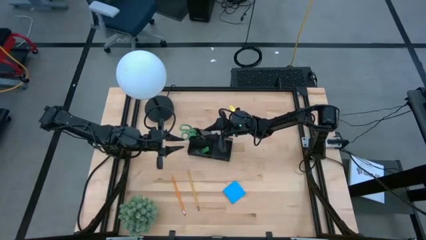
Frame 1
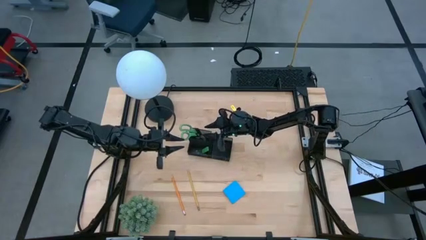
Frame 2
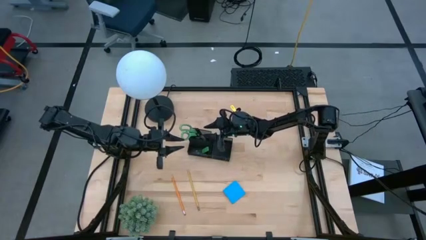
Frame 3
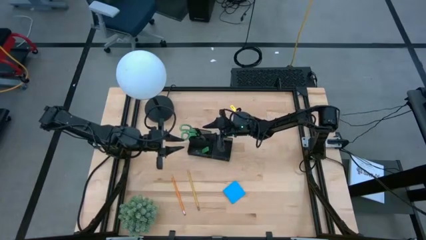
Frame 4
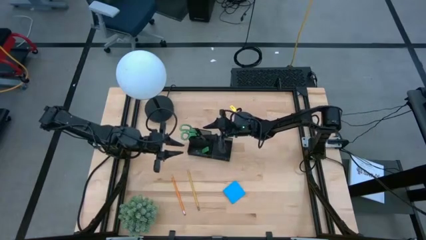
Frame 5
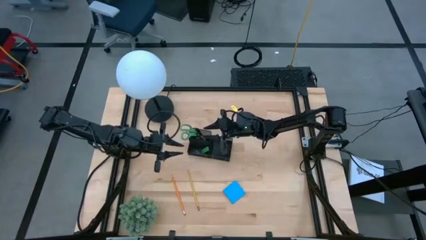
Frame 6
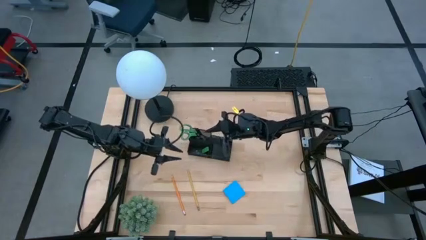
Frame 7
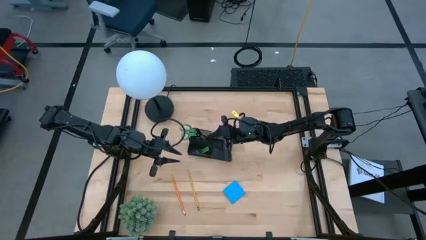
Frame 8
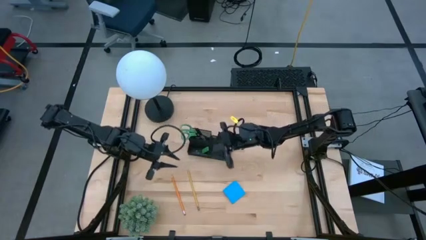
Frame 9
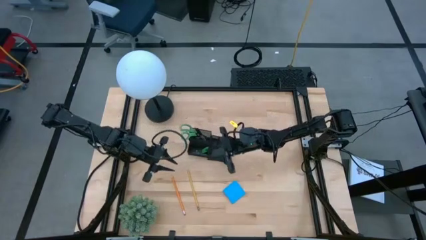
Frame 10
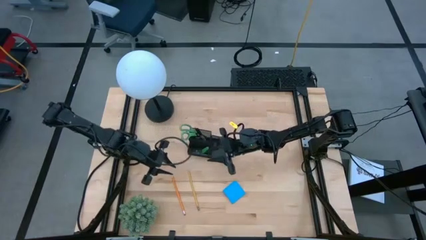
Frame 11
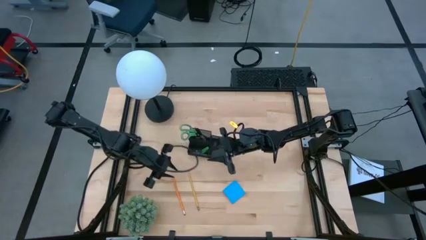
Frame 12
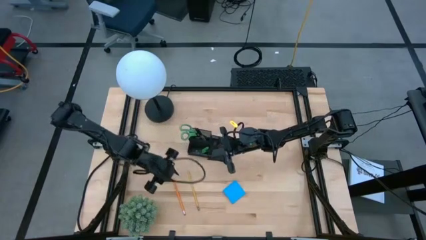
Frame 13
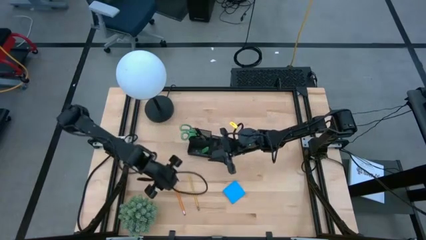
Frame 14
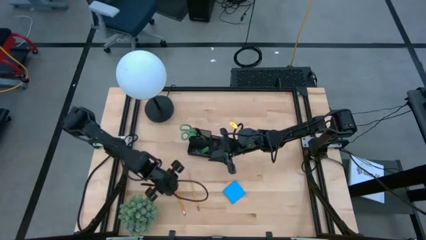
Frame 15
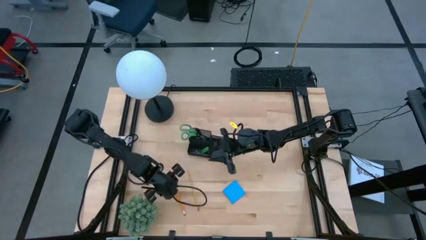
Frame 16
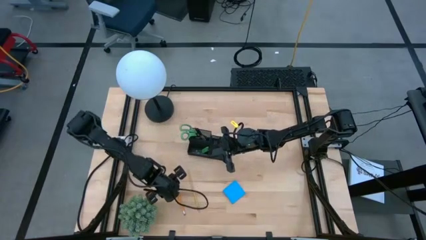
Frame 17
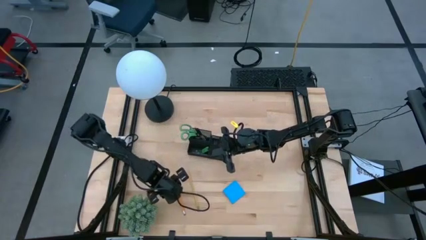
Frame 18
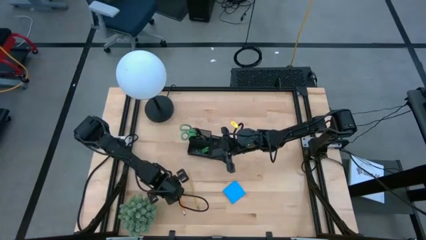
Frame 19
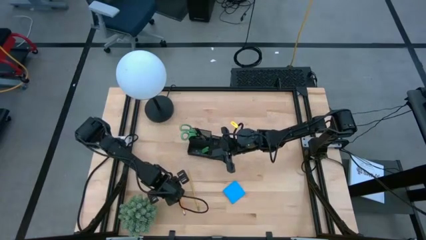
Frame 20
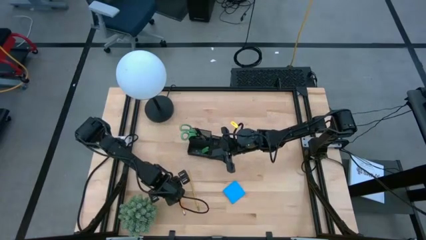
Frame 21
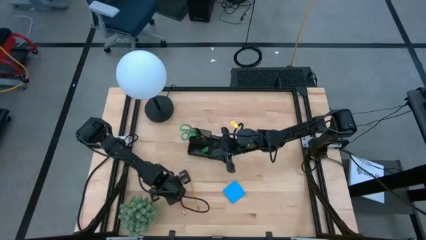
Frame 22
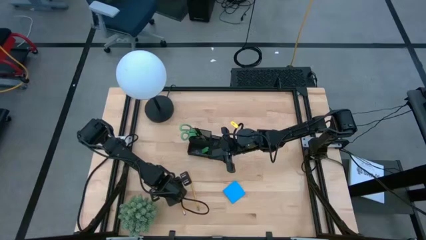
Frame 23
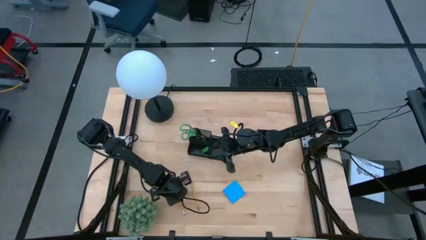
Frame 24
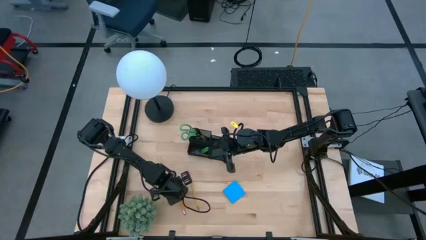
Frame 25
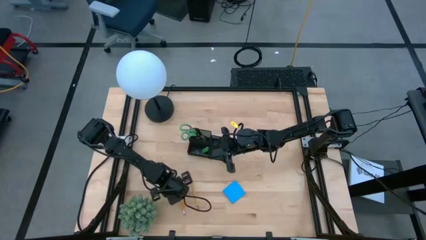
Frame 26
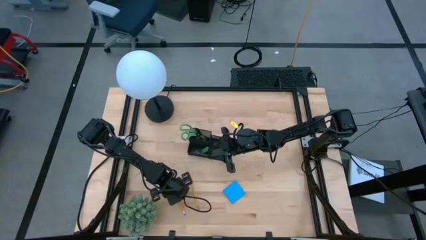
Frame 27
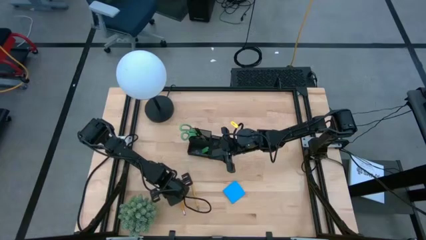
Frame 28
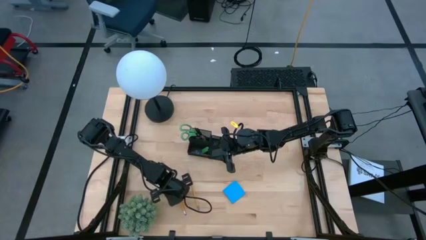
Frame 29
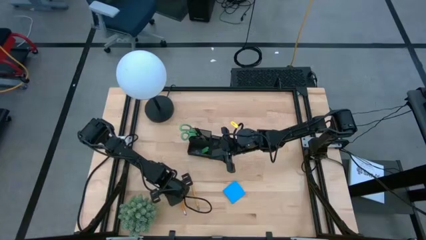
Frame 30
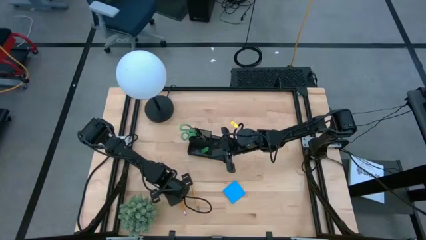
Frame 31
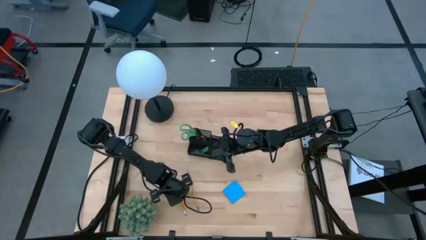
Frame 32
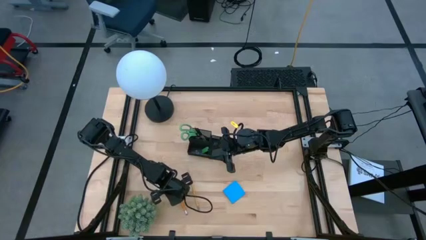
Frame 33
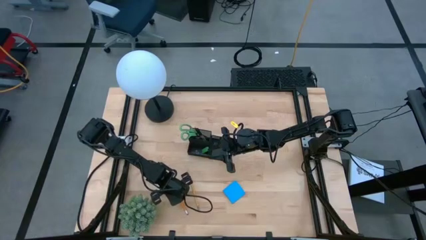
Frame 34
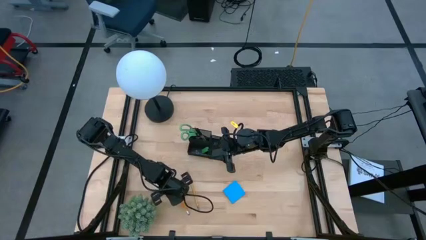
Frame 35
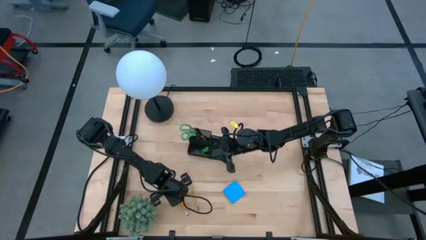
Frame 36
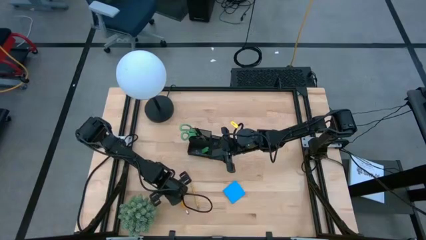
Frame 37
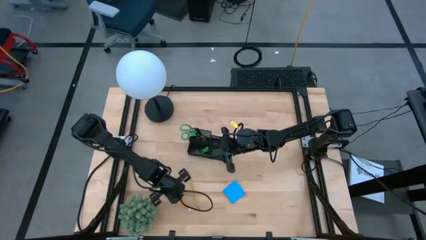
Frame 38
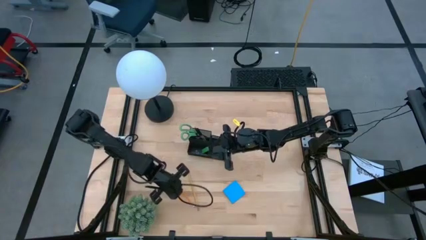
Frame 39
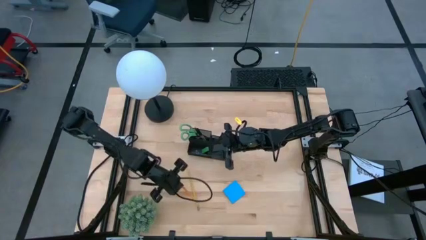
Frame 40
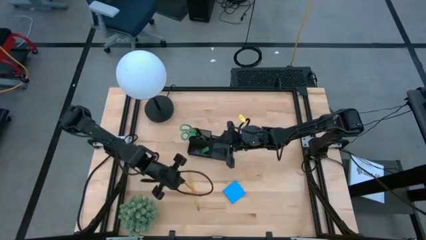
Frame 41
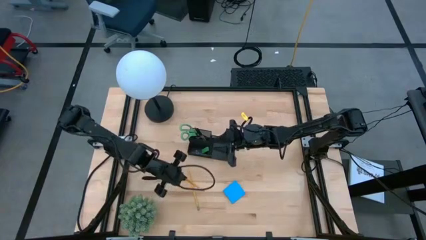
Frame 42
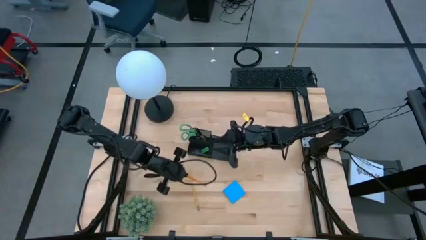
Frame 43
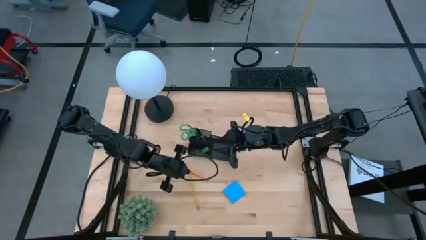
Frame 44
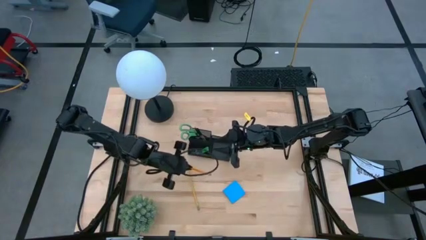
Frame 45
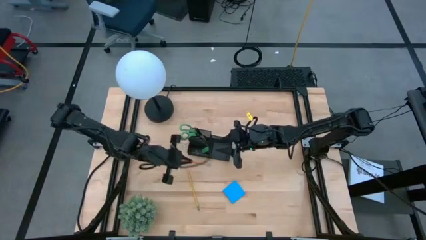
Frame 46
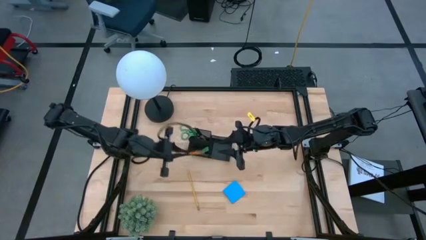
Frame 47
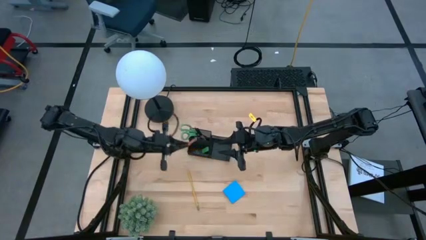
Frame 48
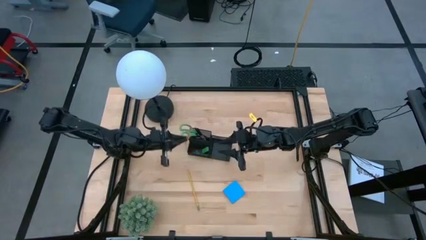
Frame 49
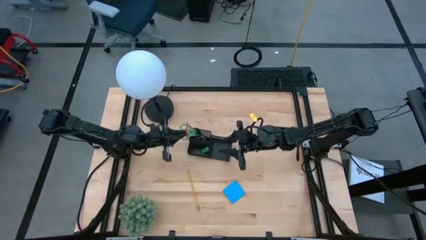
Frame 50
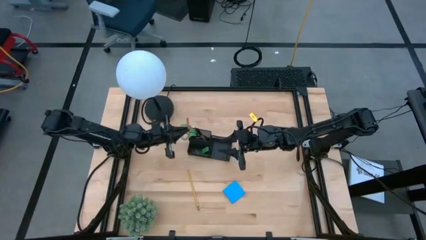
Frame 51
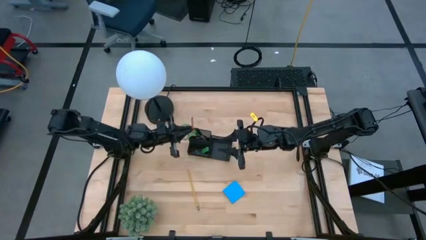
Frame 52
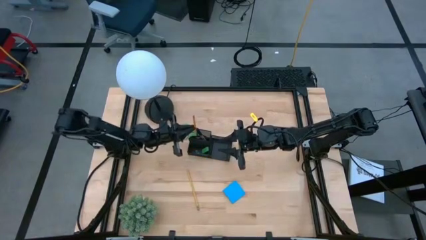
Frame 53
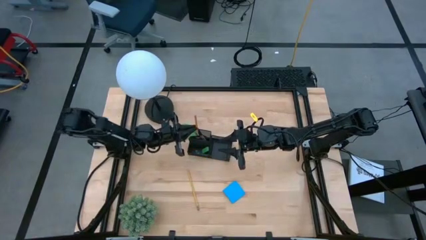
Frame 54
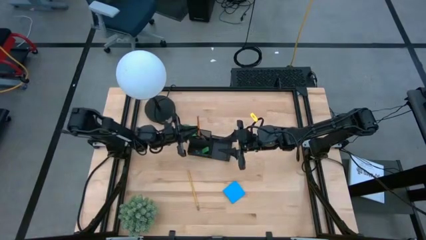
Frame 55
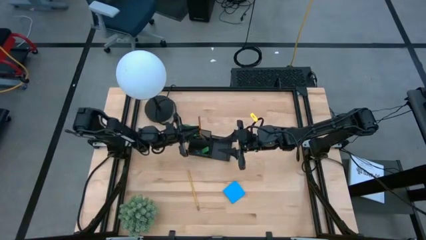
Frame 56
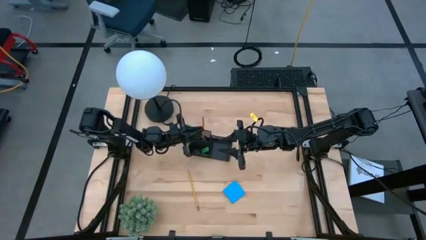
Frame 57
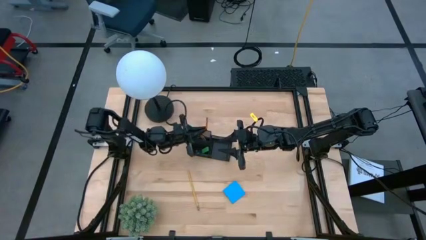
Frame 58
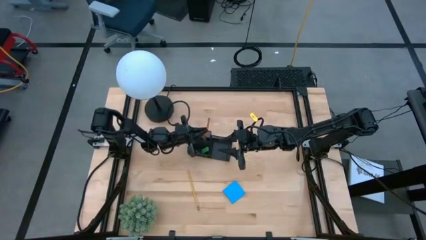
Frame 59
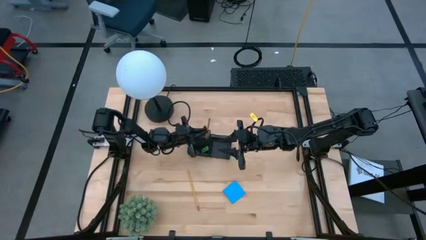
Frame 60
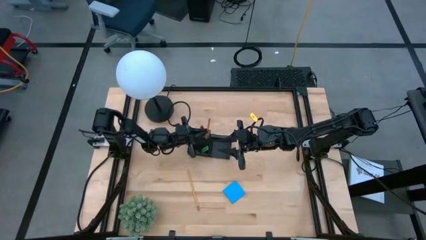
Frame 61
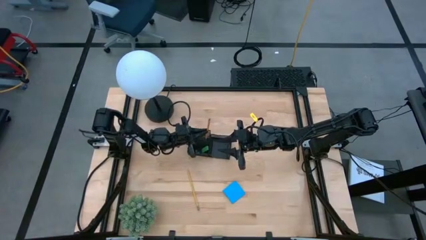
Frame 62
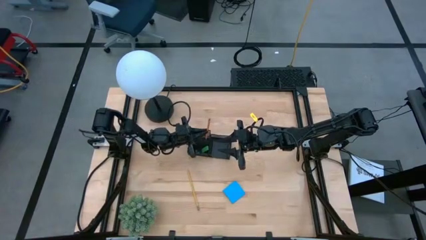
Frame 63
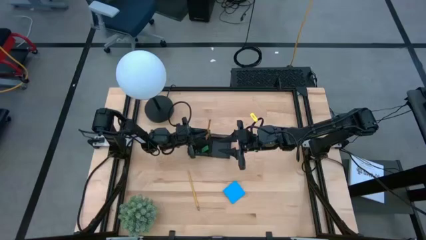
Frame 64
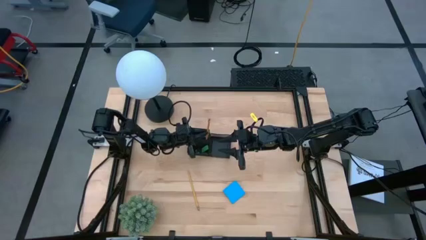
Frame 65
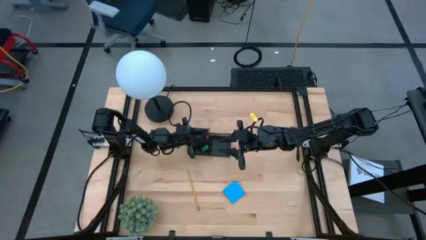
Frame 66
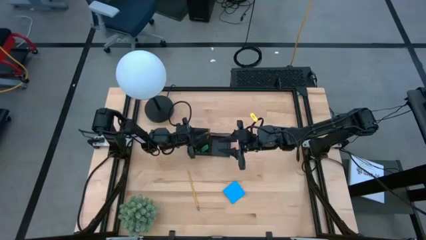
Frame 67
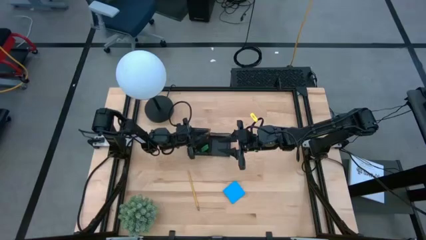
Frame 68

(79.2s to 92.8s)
Task: Pick and place office supplies into organizer
Put the orange pencil into the black desk organizer
